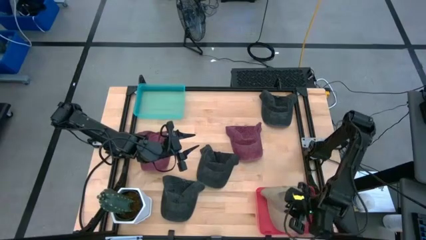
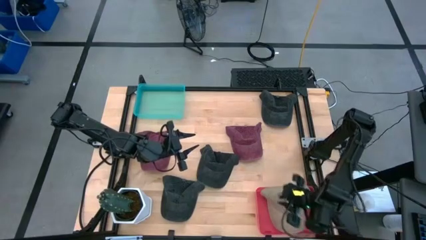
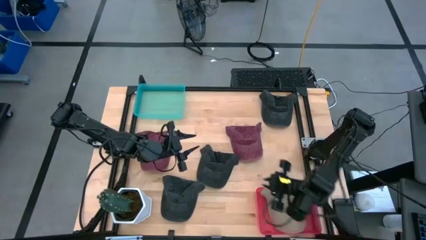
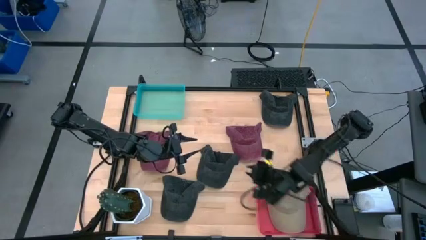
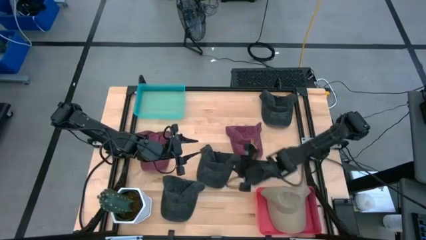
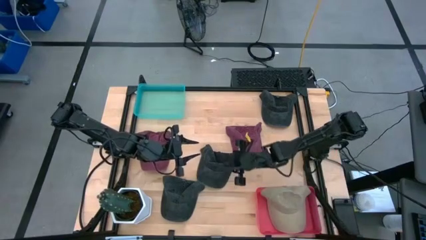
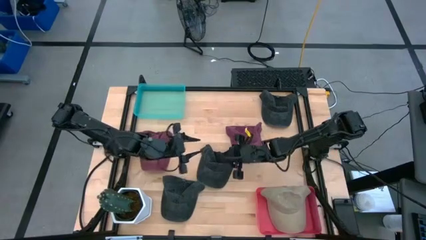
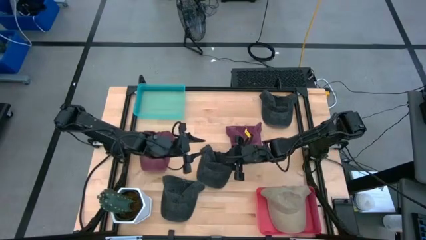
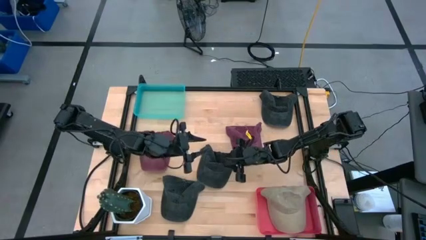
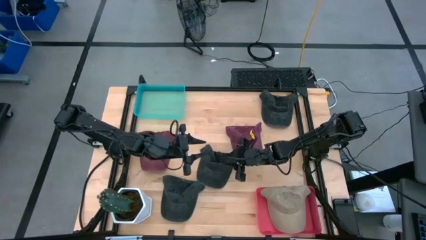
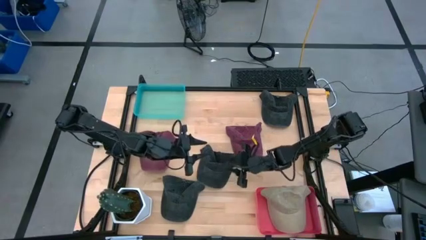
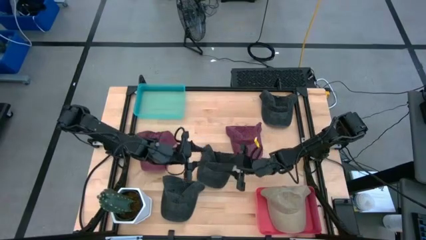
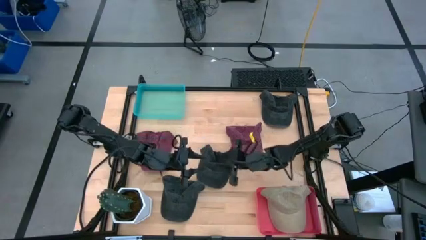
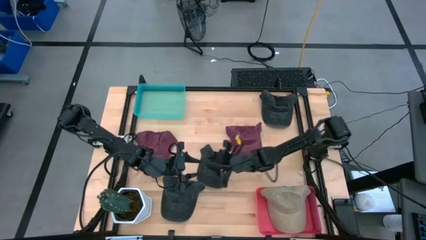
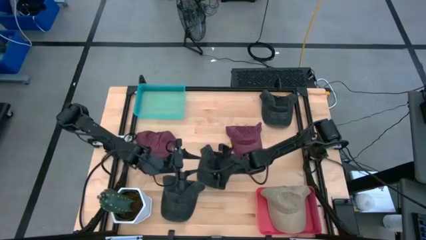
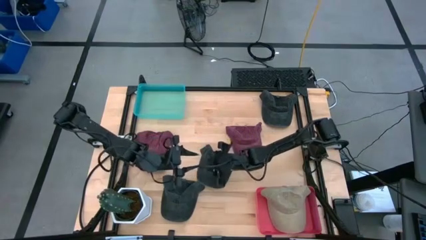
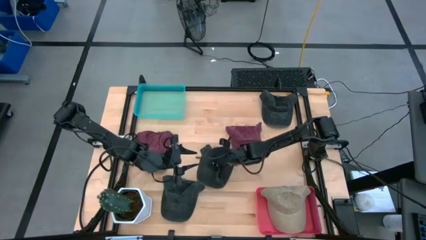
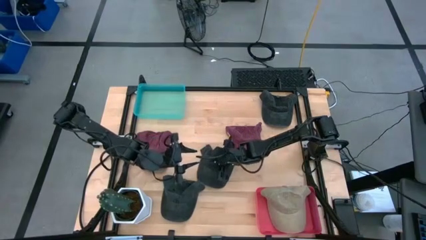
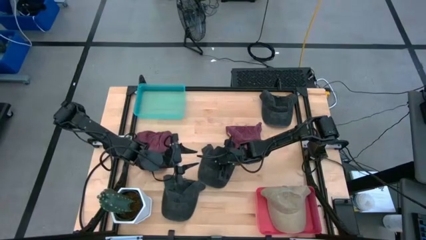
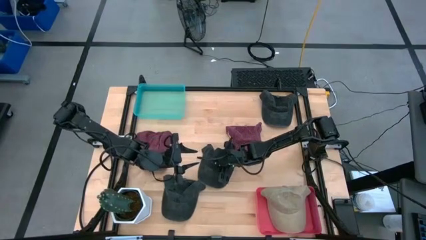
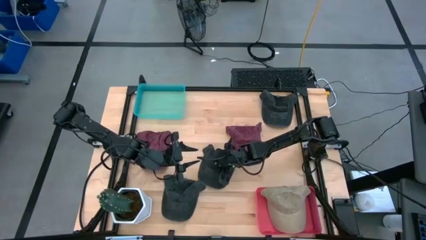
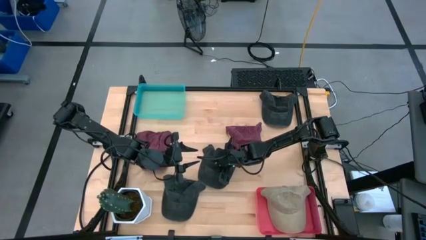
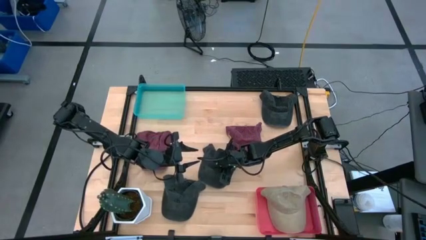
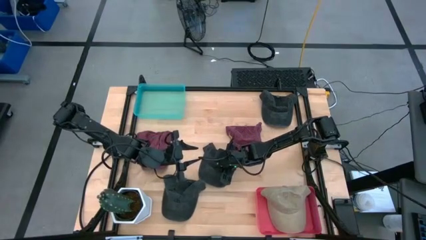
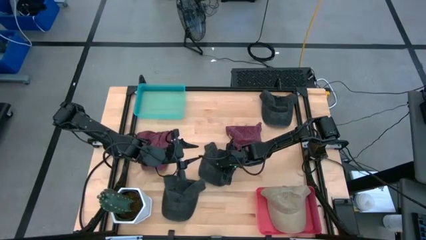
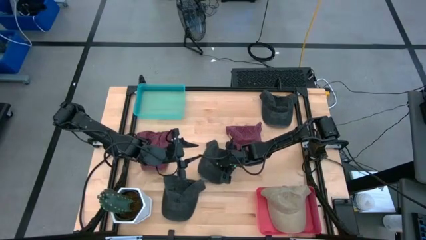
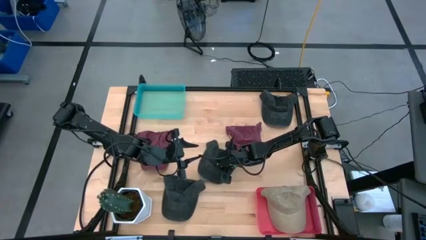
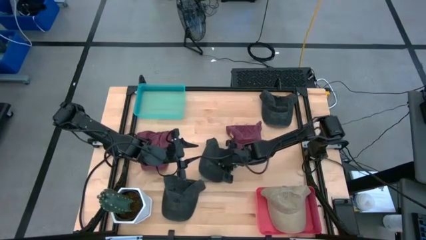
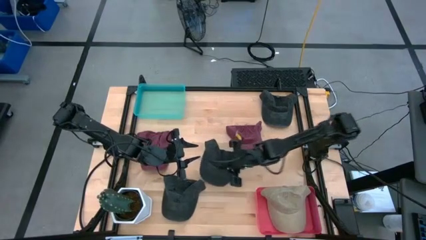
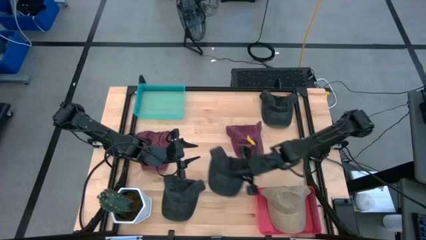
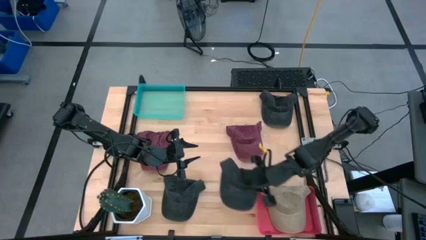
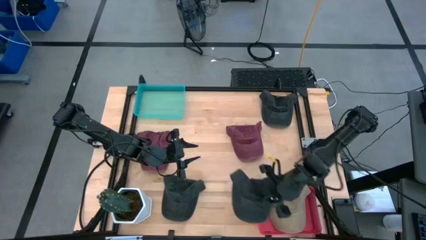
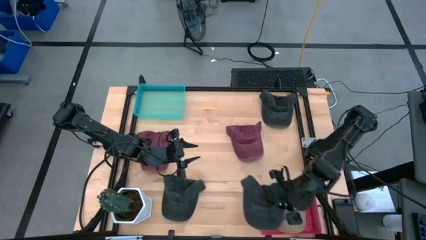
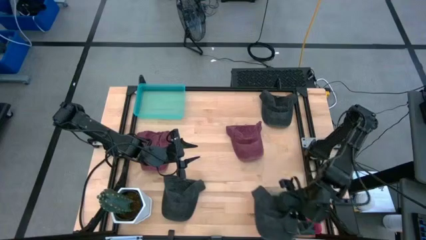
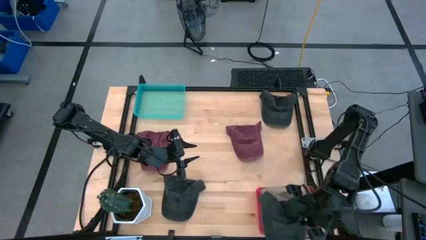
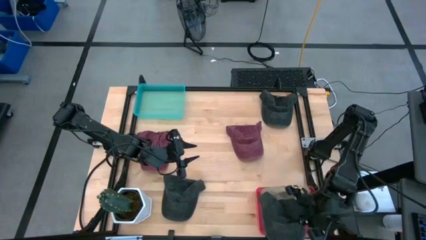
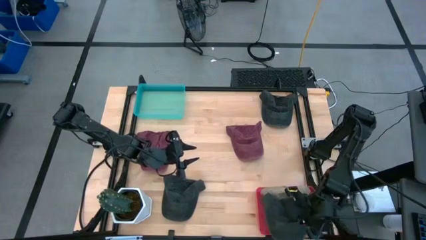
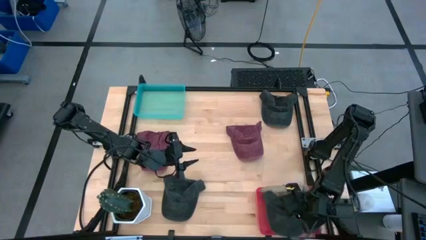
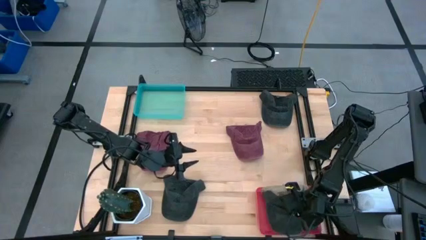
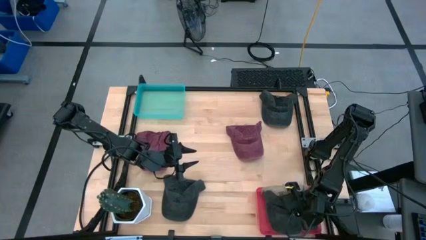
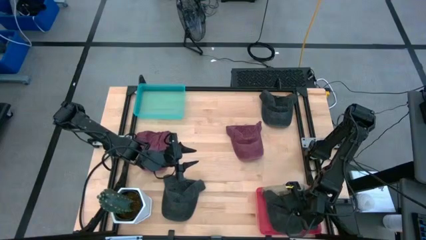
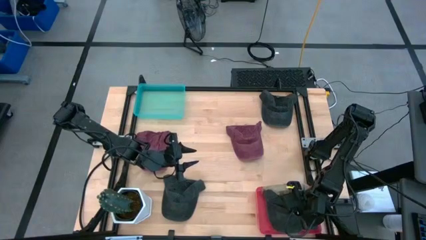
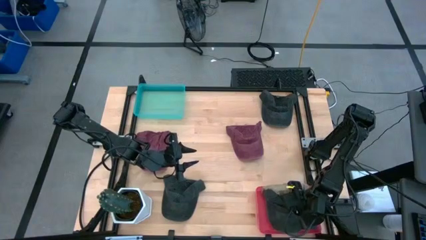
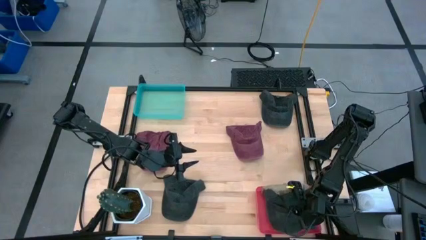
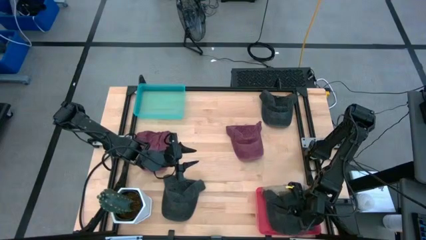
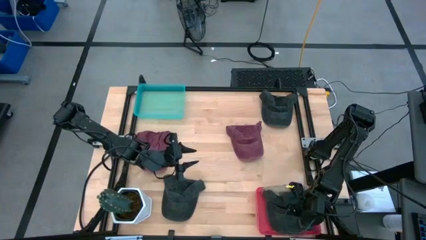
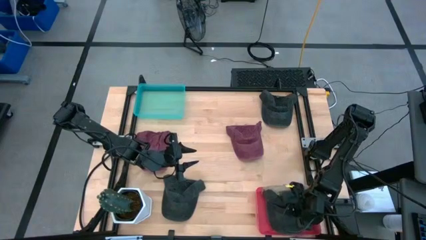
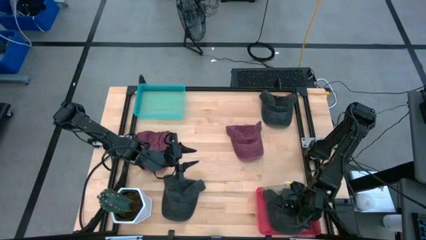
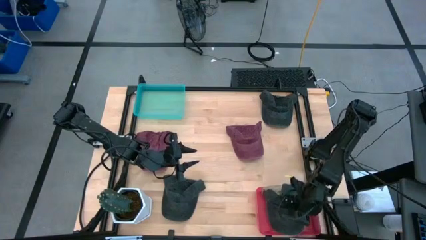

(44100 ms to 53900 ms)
Task: Pick & Place hat
Put the middle black cap into the pink bin
